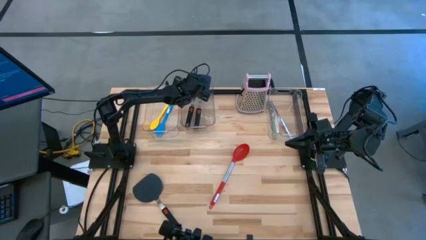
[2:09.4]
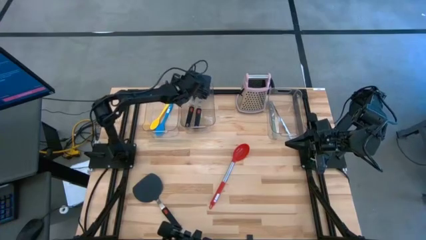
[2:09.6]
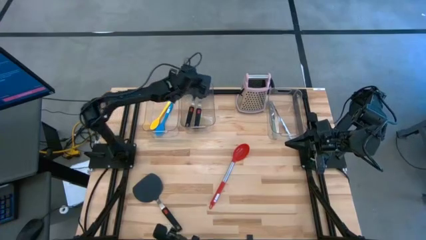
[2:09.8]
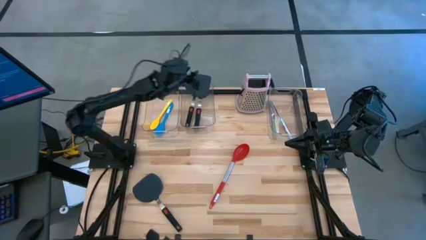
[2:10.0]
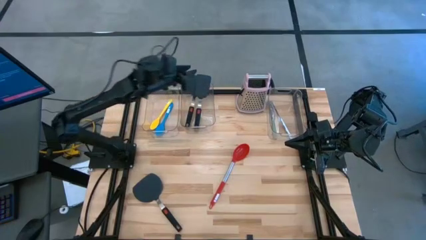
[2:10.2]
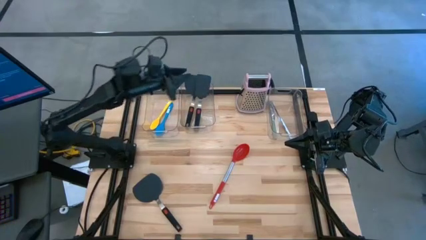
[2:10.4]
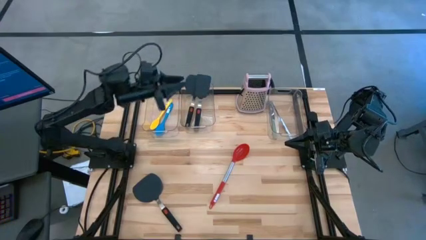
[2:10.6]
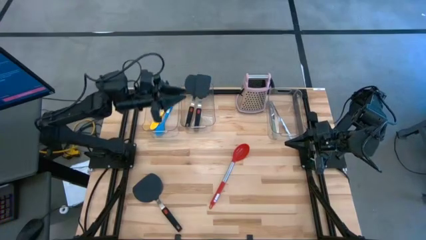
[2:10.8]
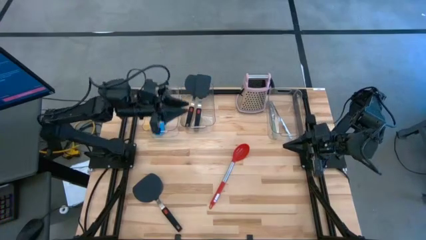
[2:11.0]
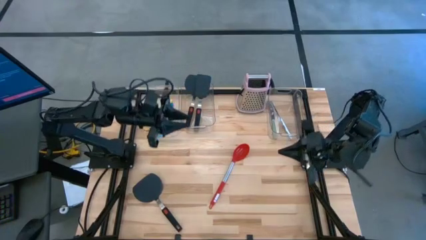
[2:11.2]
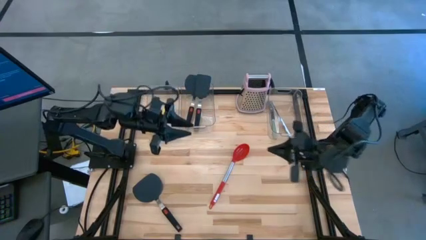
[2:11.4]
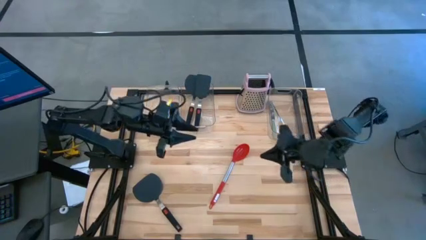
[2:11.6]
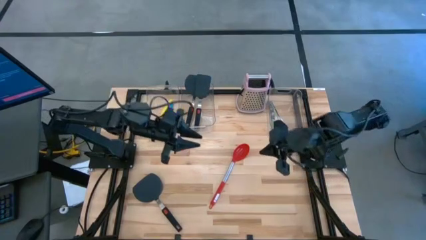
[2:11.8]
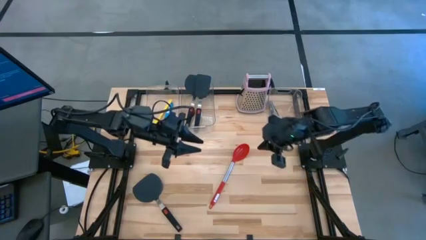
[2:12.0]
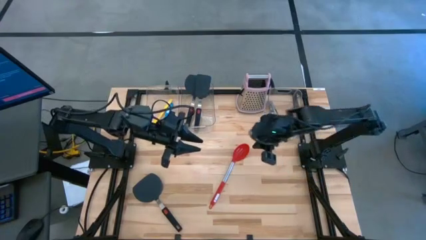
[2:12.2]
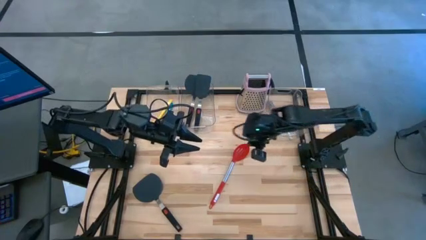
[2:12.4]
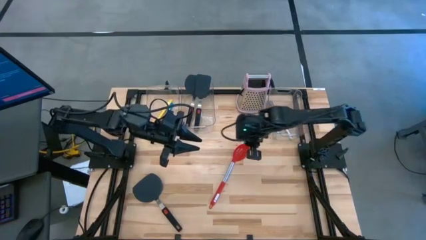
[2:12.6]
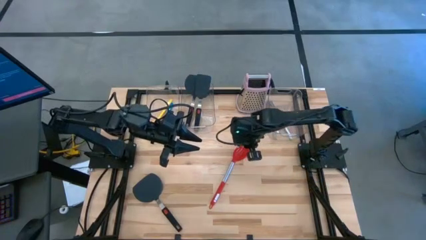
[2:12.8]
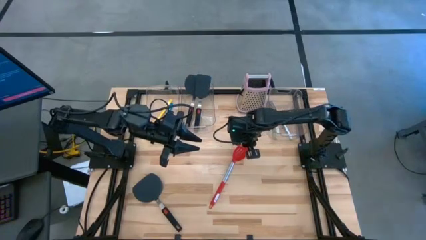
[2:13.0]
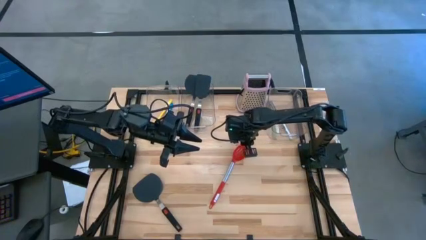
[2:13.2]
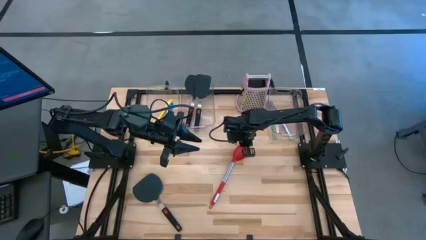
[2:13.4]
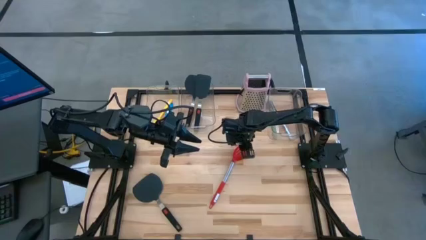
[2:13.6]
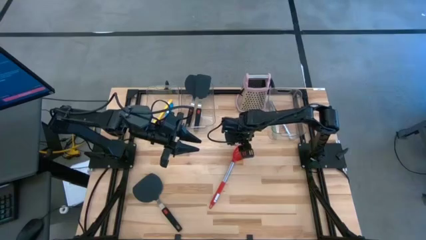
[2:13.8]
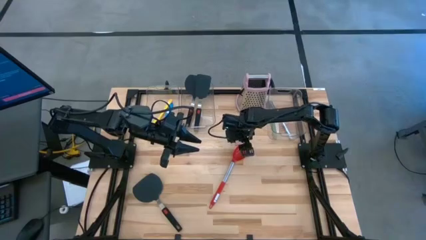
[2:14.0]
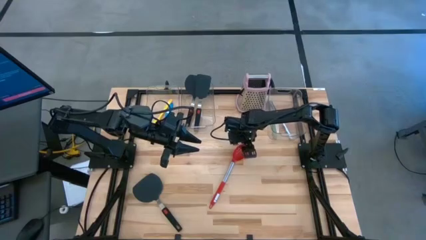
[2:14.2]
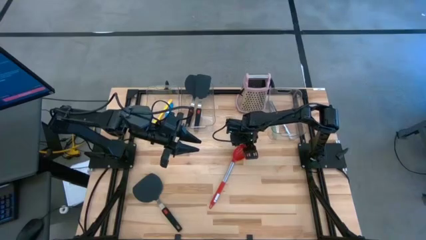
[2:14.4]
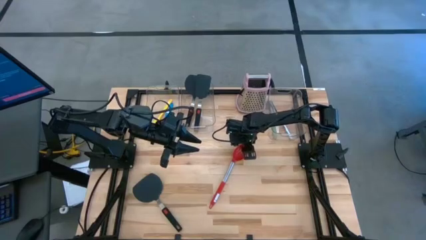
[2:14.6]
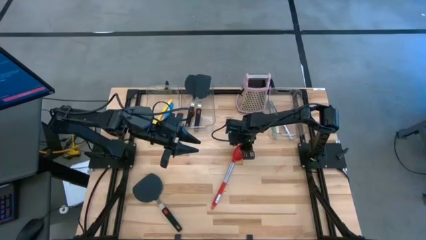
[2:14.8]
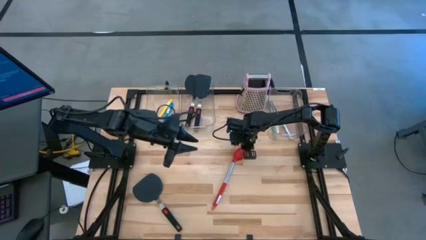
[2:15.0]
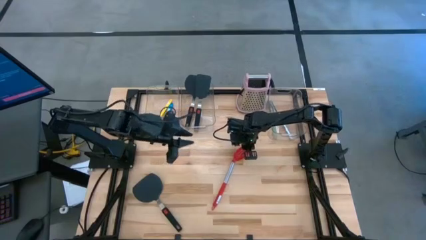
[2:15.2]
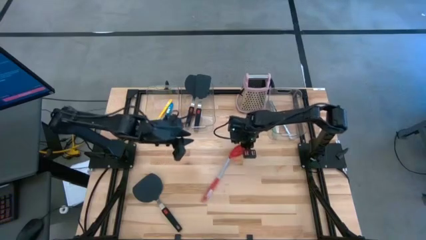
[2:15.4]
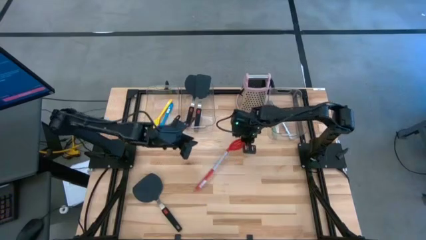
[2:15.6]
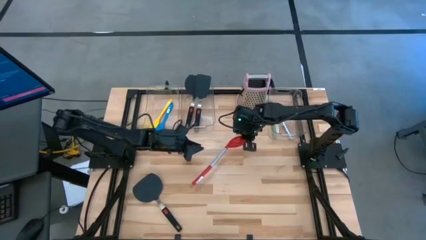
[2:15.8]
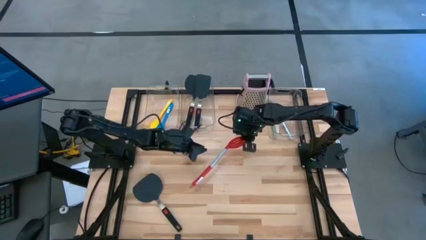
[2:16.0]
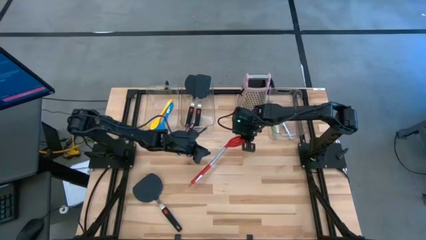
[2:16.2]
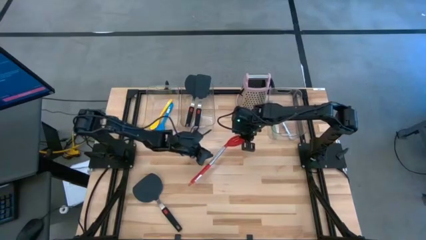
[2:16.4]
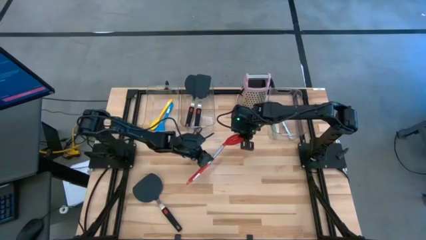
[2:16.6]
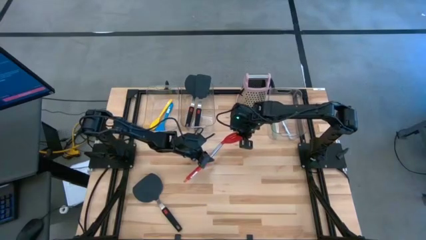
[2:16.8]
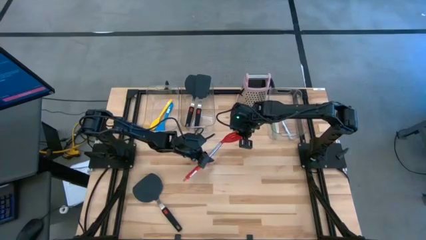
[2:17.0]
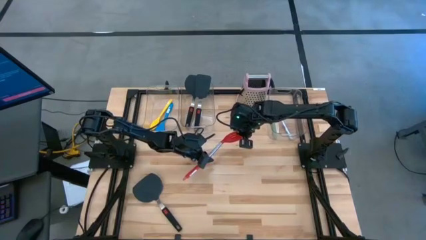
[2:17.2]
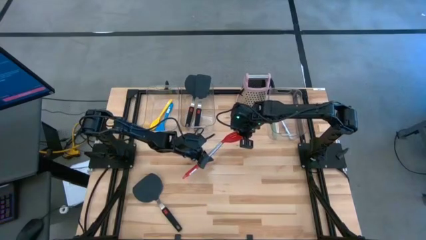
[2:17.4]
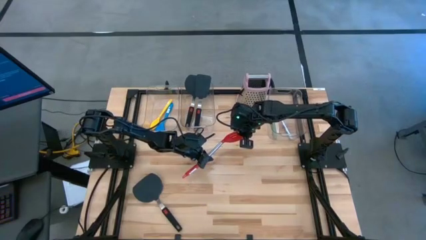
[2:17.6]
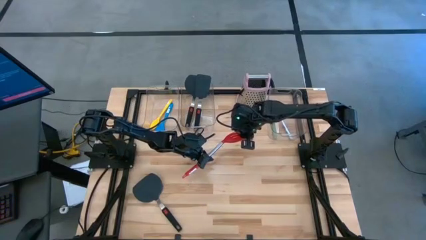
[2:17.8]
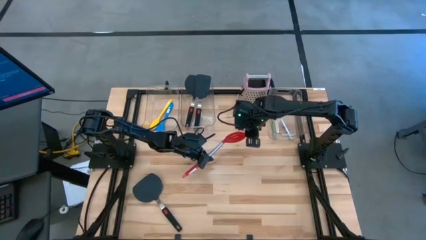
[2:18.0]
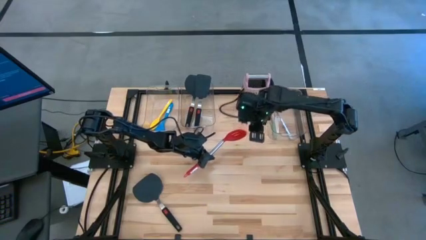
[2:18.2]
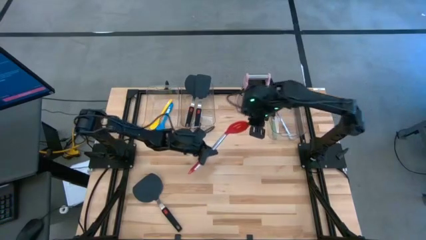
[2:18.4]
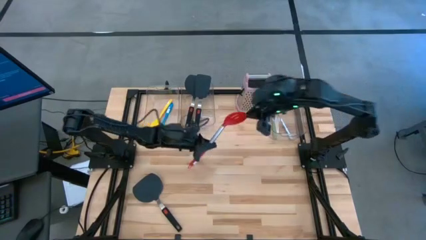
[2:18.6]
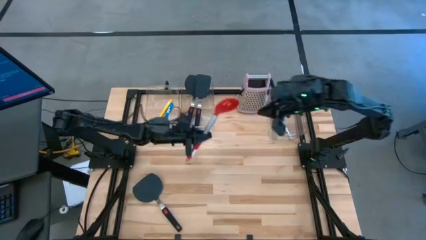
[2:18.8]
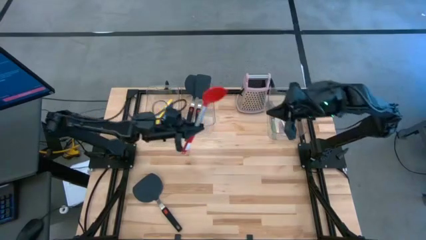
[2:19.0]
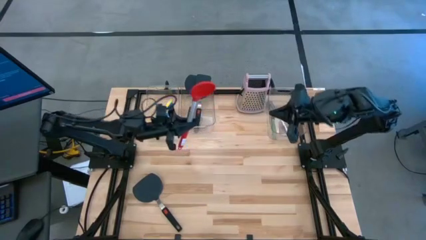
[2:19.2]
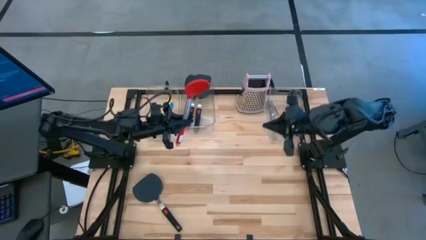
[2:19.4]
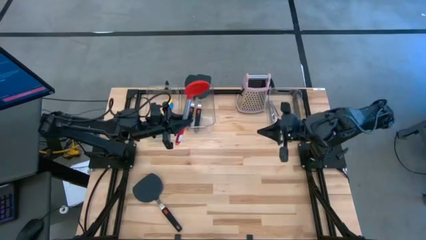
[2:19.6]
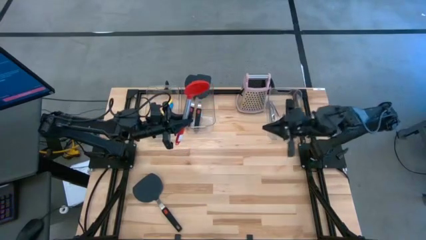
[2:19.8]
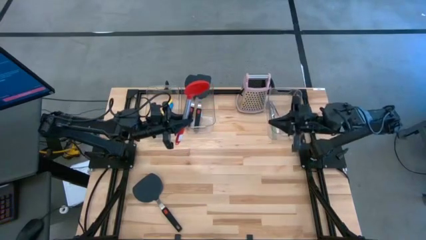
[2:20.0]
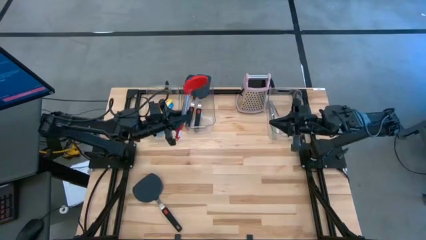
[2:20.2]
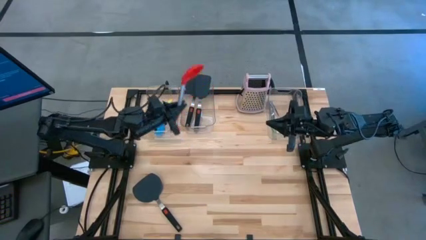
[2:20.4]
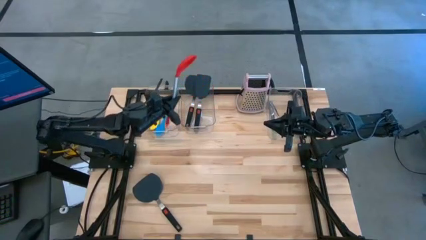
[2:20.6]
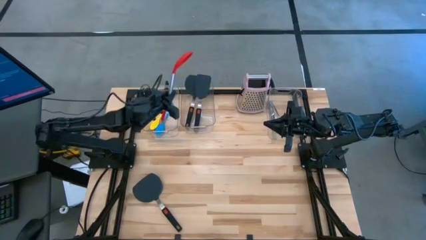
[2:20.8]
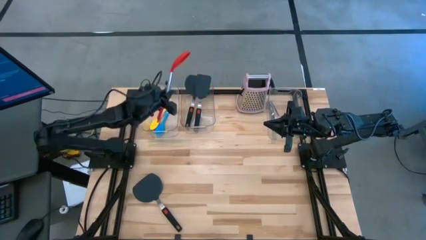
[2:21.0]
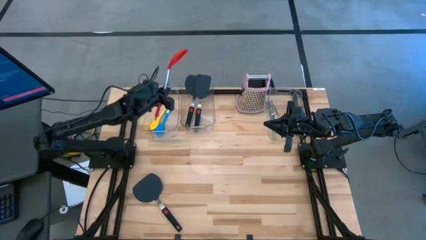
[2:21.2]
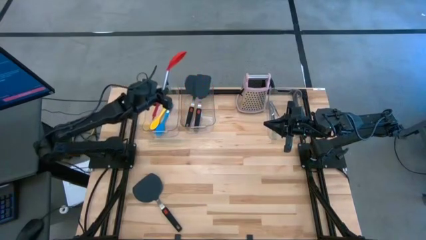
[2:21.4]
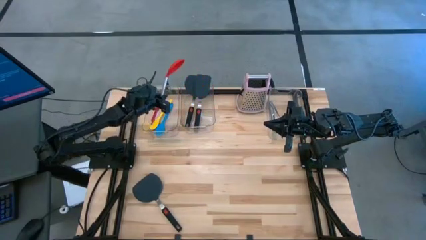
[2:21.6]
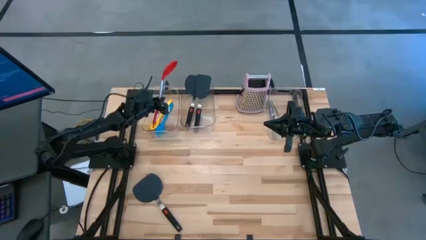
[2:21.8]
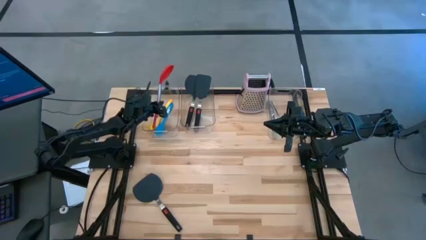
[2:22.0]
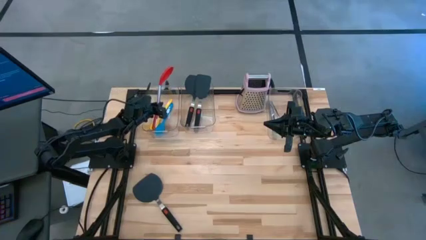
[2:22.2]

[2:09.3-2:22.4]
Task: Pick & Place Kitchen Items
Put the red serving spoon into the left transparent bin

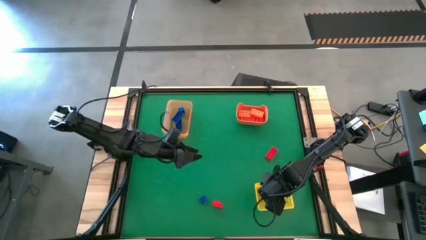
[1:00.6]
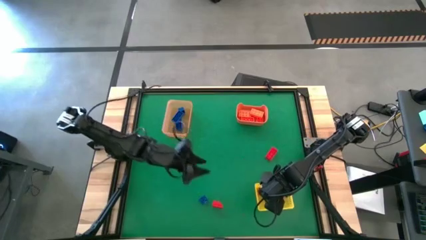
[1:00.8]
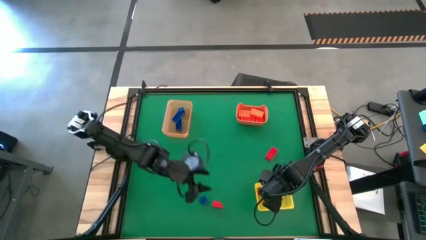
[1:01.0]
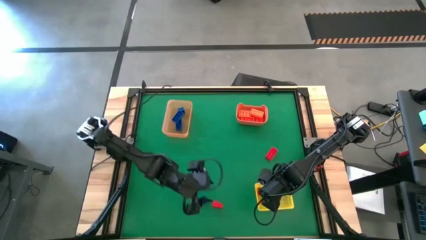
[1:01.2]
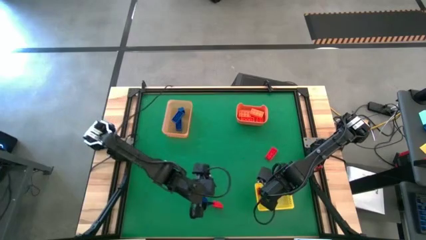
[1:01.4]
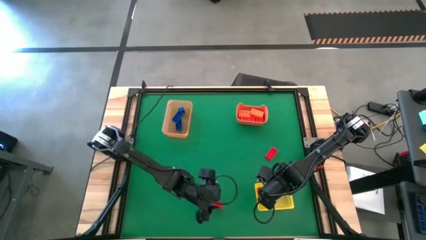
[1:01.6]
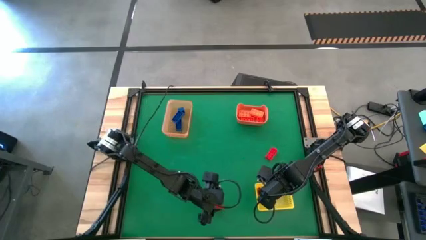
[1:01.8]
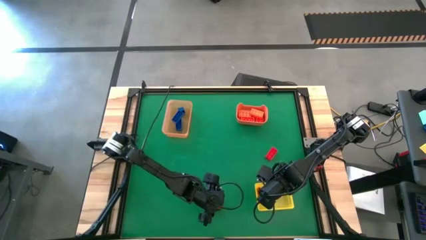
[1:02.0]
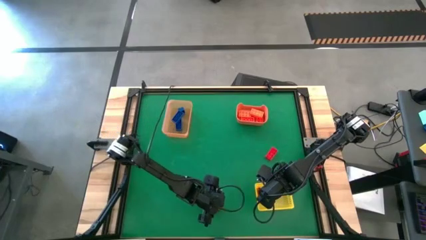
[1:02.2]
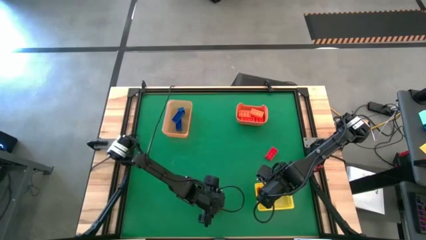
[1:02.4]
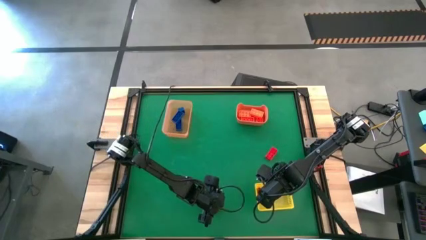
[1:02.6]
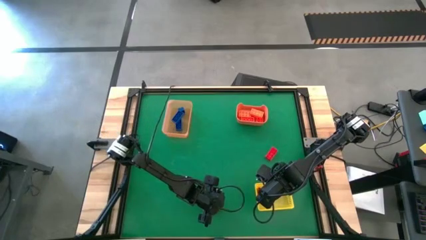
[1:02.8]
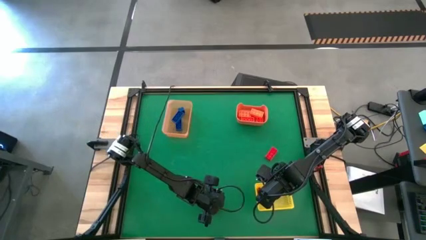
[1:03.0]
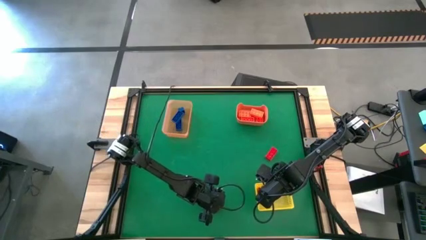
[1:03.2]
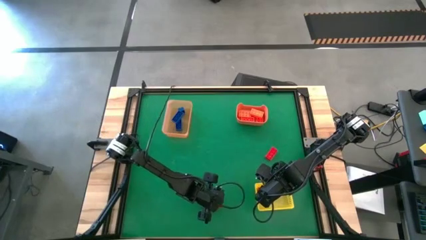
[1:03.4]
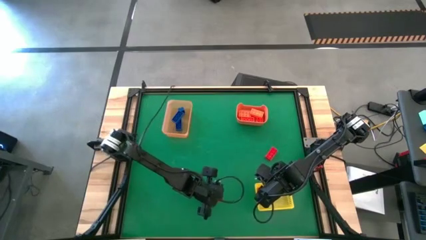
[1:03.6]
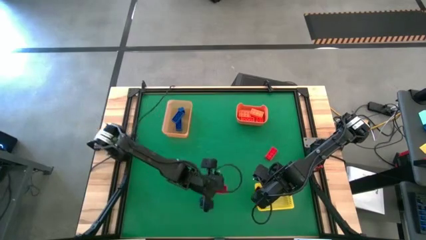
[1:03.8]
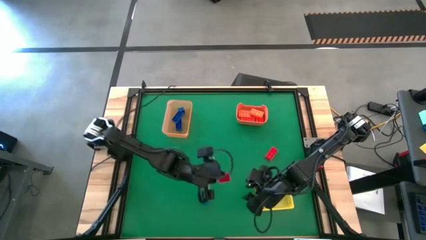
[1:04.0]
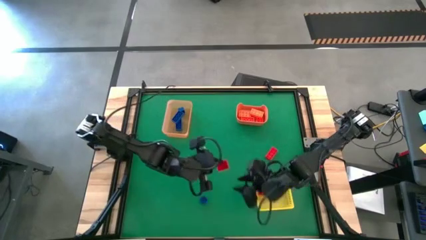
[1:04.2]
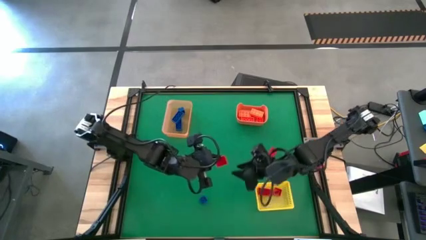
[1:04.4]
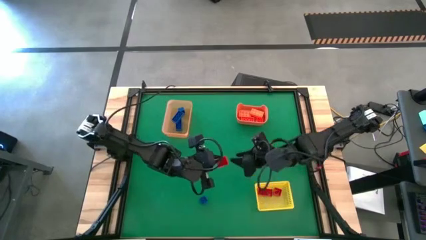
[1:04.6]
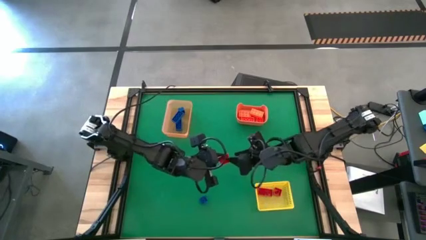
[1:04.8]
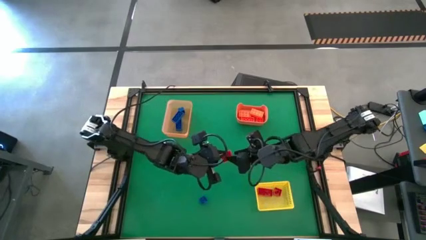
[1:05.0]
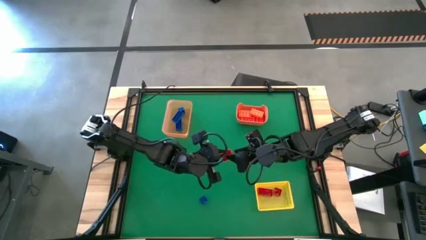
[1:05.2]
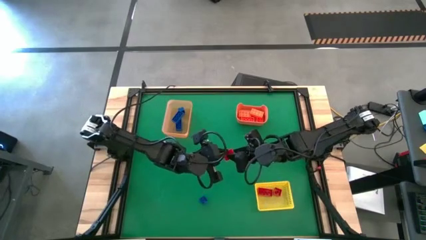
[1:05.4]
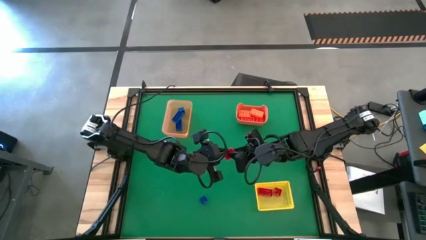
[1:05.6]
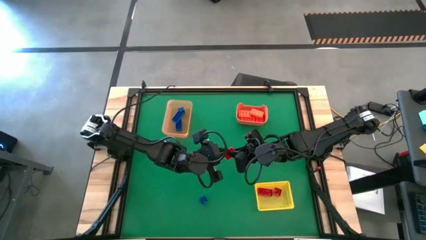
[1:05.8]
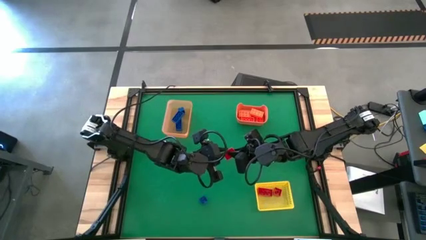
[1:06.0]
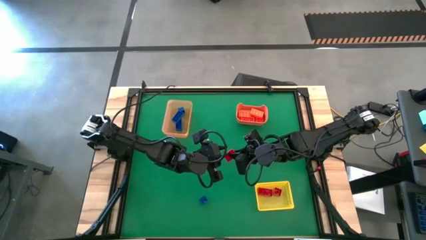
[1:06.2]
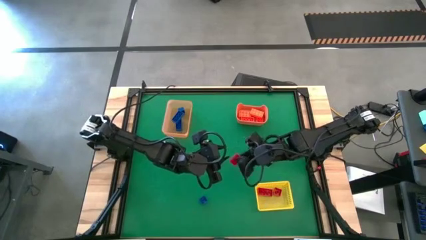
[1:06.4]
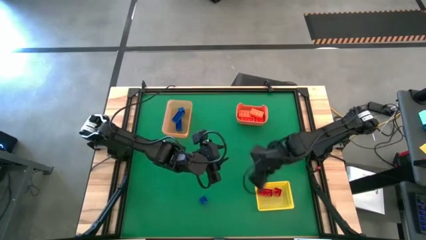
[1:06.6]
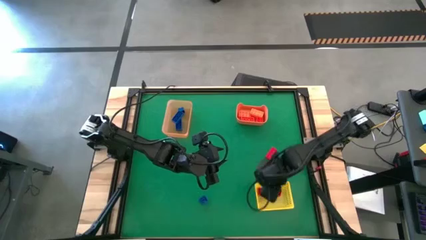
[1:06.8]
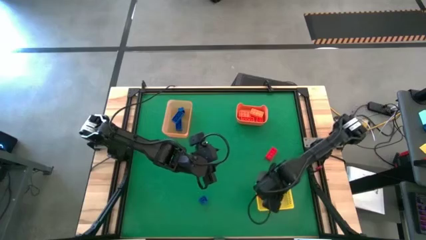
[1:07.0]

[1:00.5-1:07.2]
Task: Sort & place blocks by color
Put the red game piece into the yellow bin
